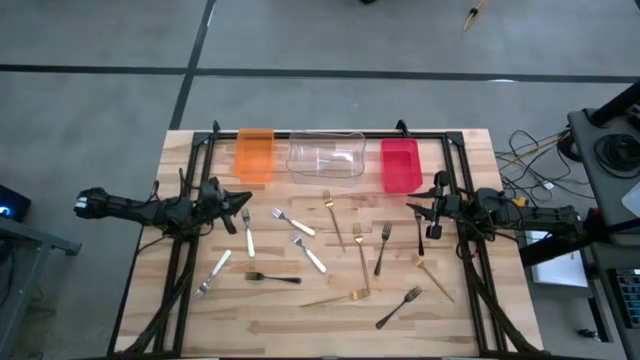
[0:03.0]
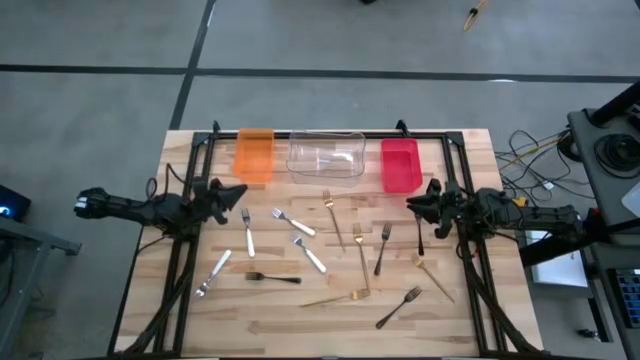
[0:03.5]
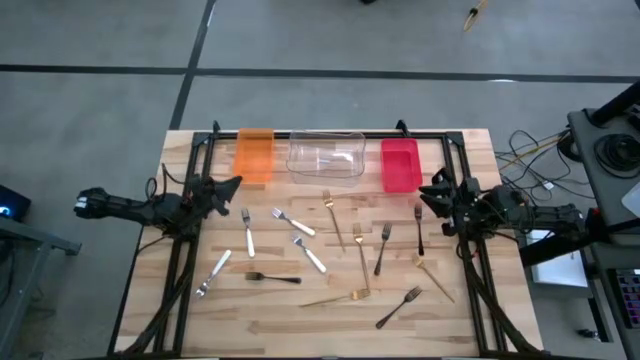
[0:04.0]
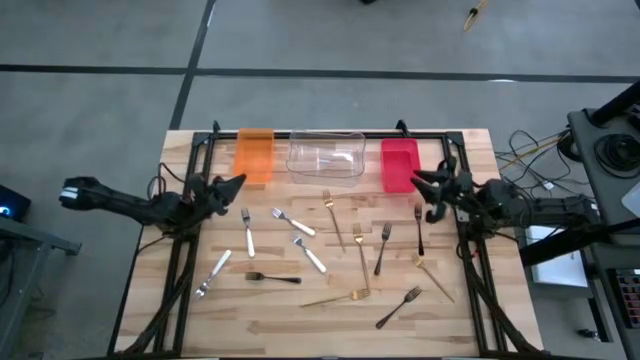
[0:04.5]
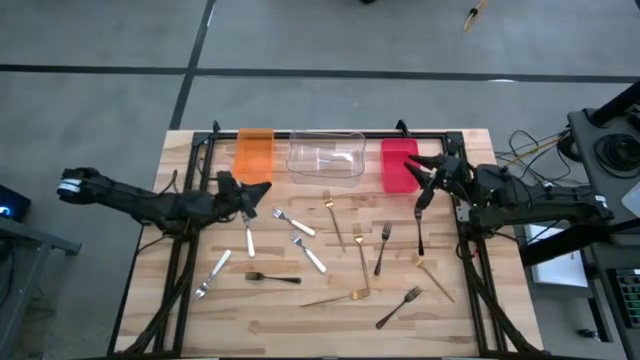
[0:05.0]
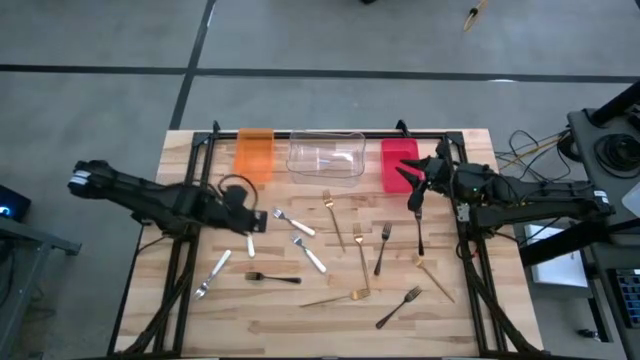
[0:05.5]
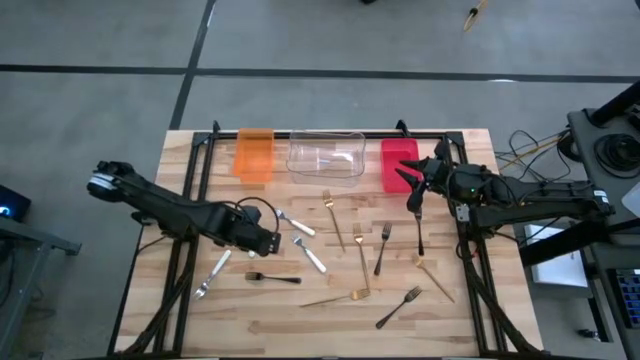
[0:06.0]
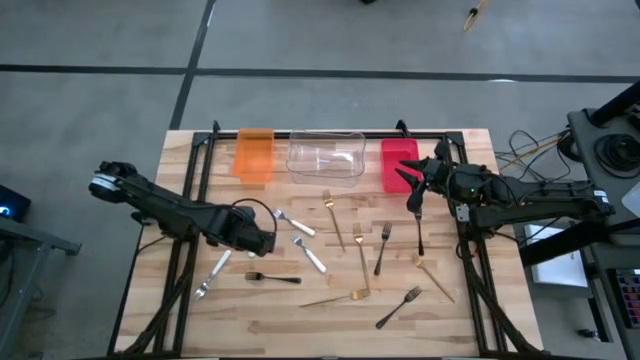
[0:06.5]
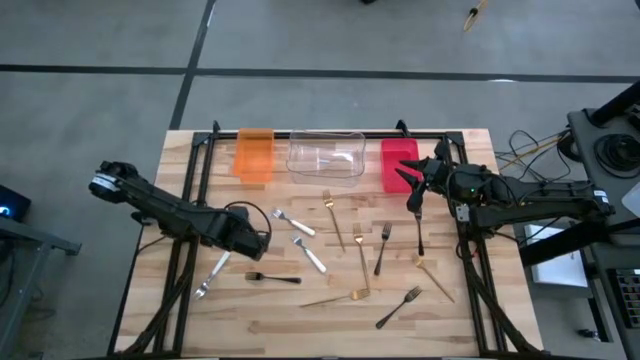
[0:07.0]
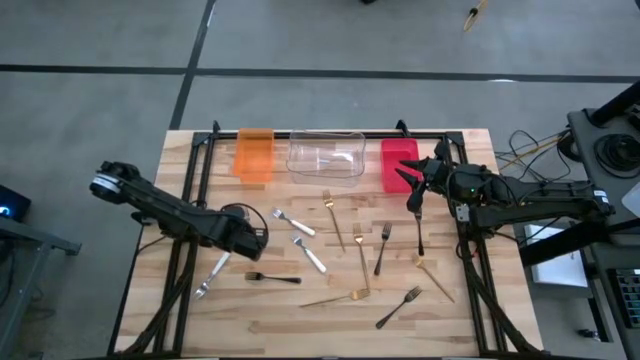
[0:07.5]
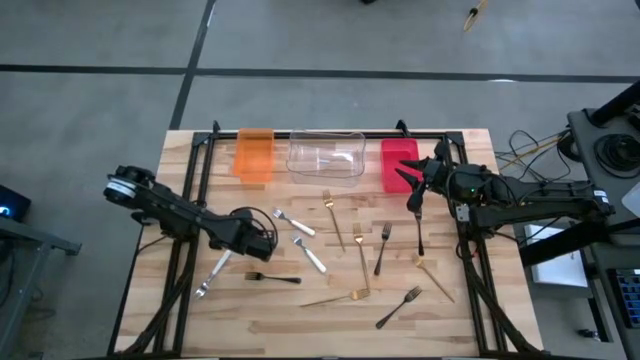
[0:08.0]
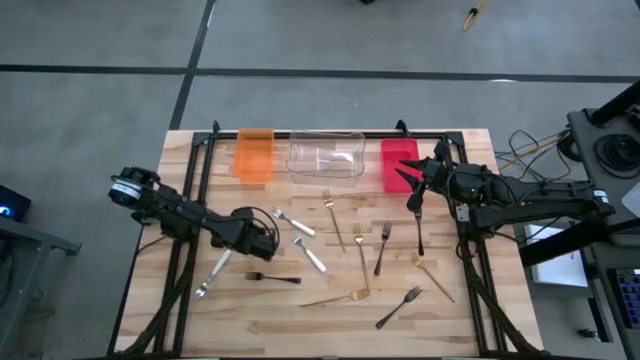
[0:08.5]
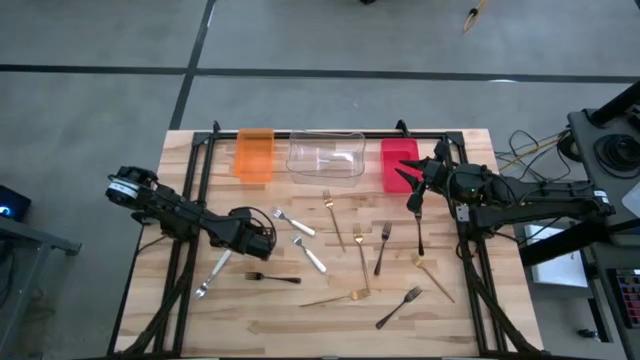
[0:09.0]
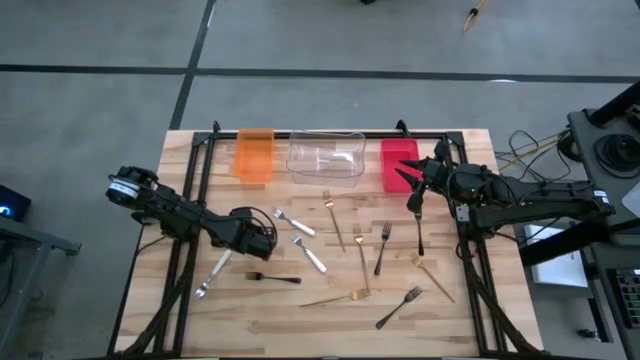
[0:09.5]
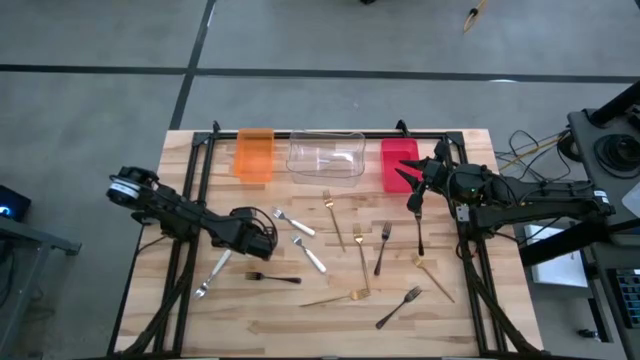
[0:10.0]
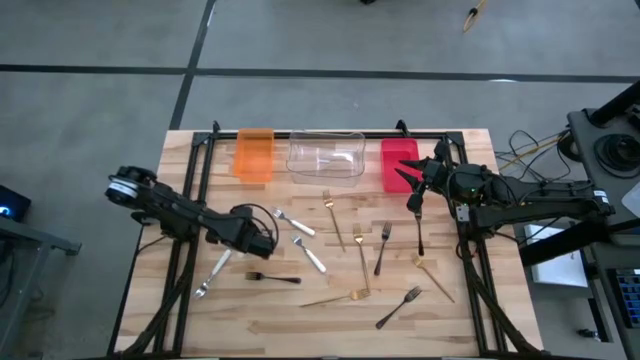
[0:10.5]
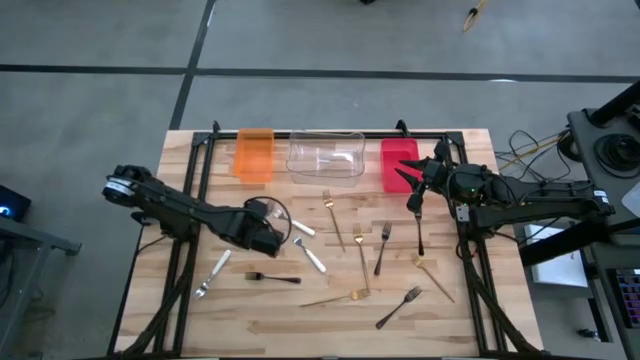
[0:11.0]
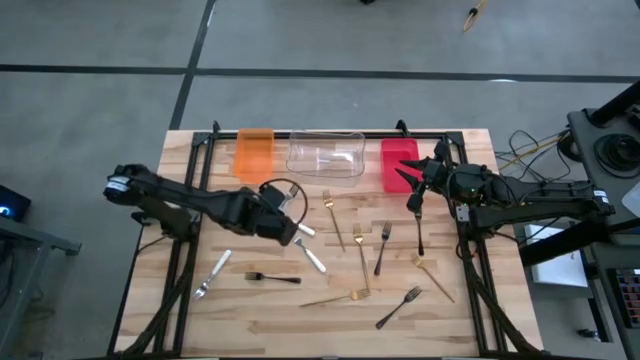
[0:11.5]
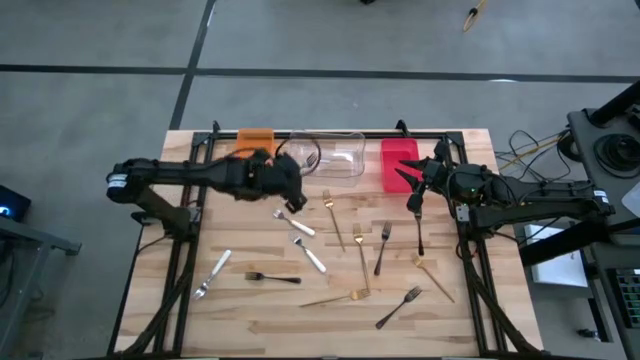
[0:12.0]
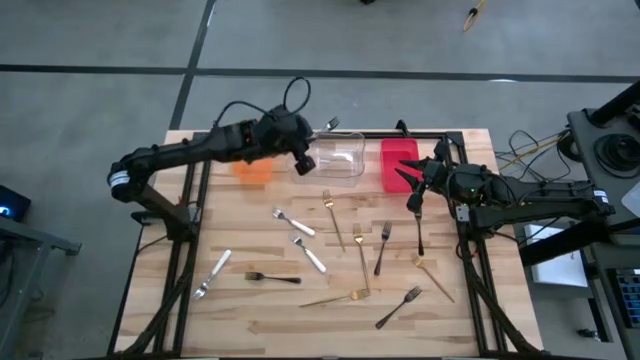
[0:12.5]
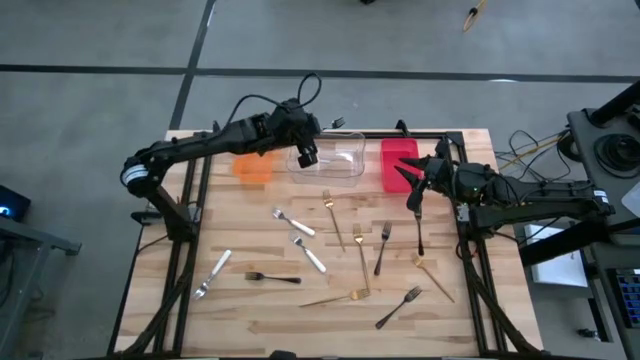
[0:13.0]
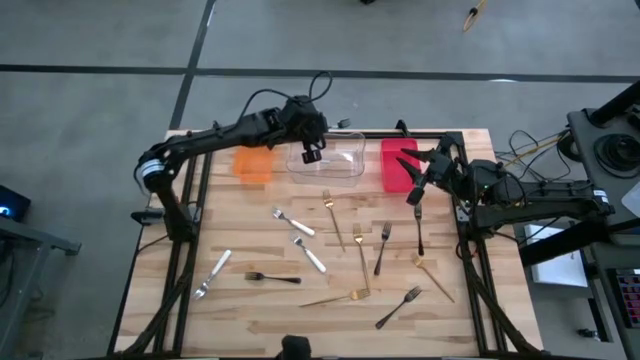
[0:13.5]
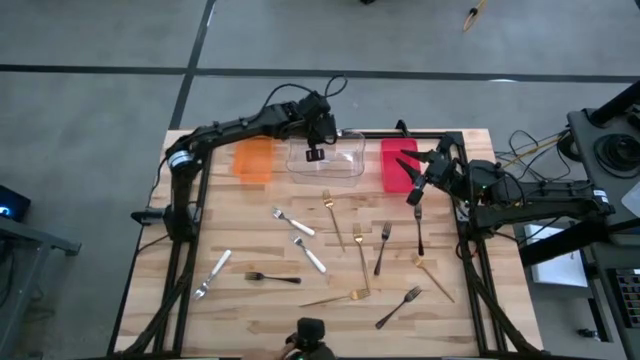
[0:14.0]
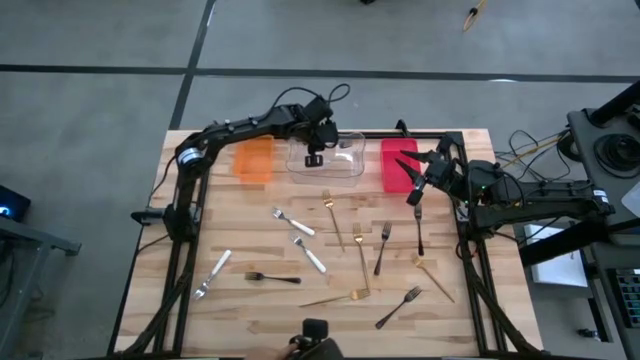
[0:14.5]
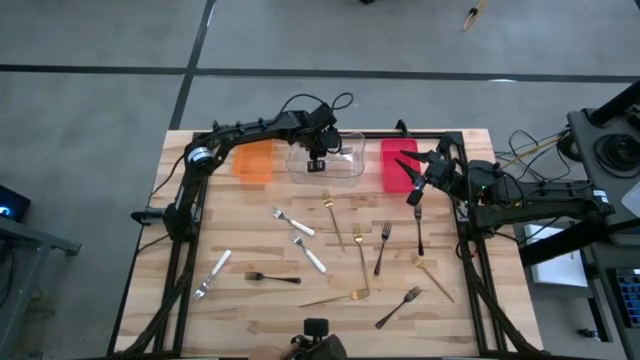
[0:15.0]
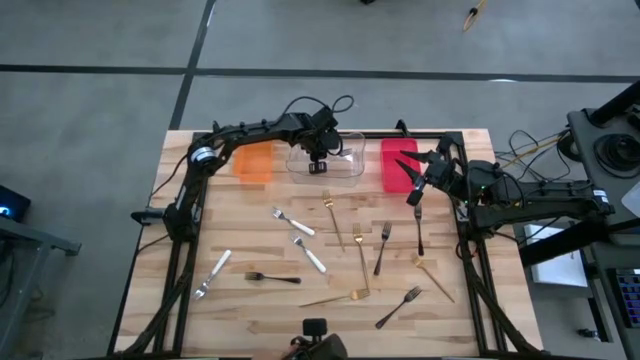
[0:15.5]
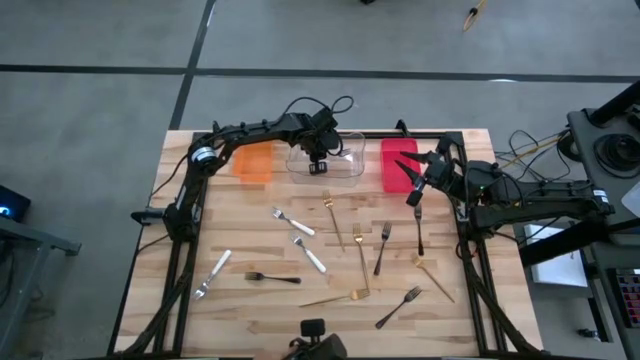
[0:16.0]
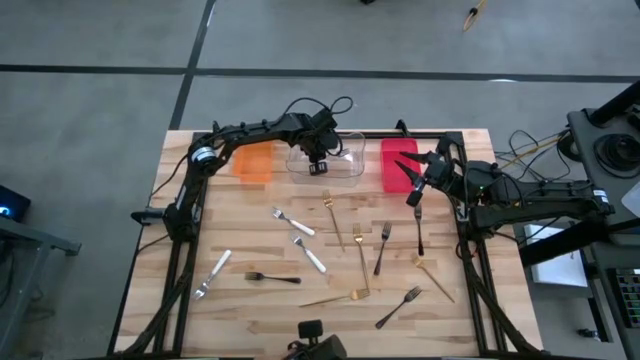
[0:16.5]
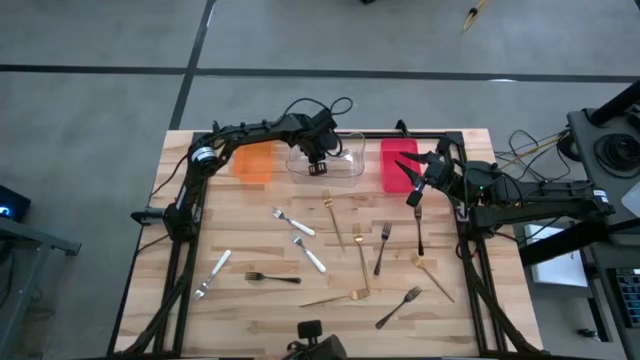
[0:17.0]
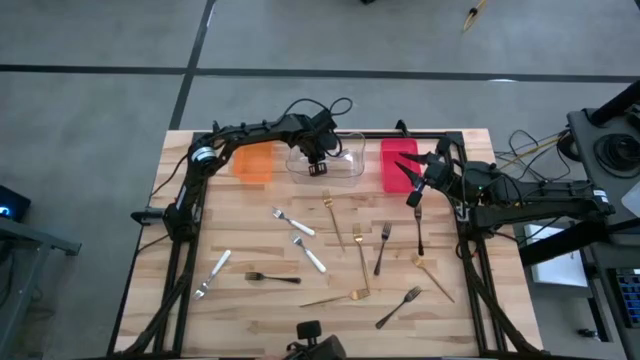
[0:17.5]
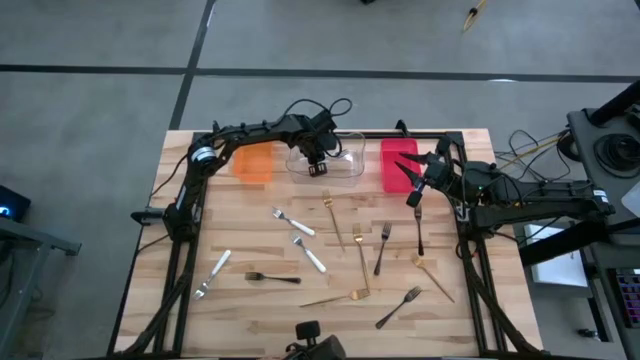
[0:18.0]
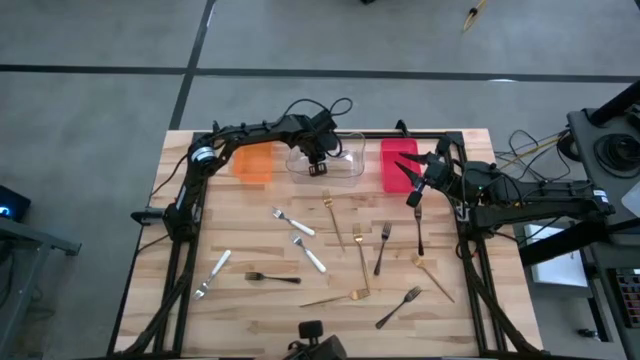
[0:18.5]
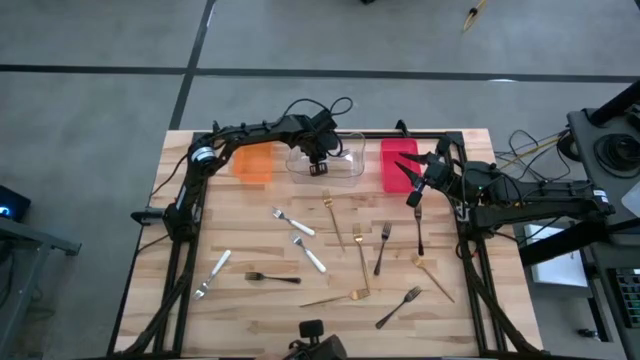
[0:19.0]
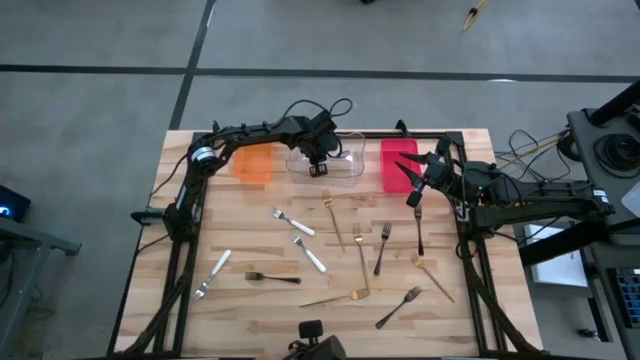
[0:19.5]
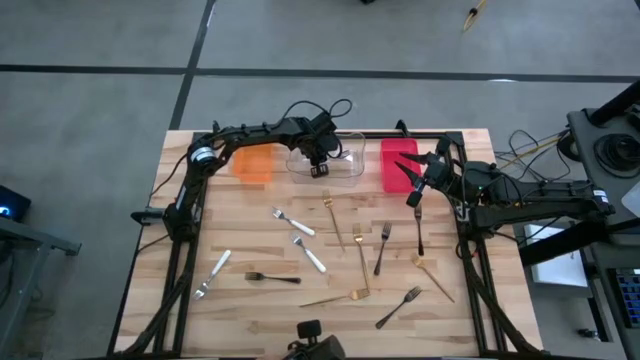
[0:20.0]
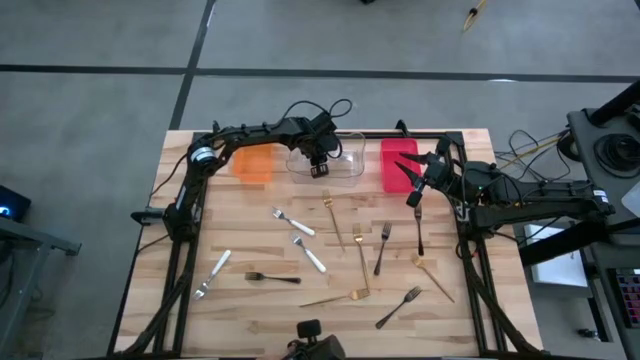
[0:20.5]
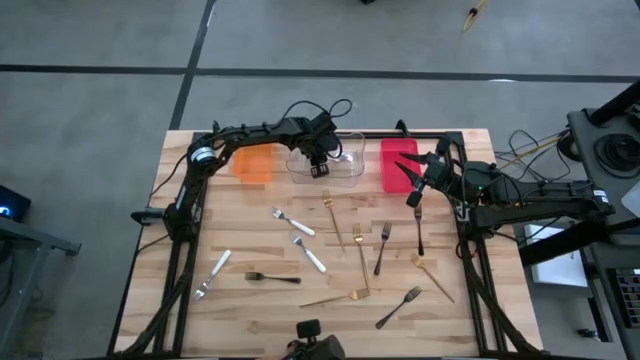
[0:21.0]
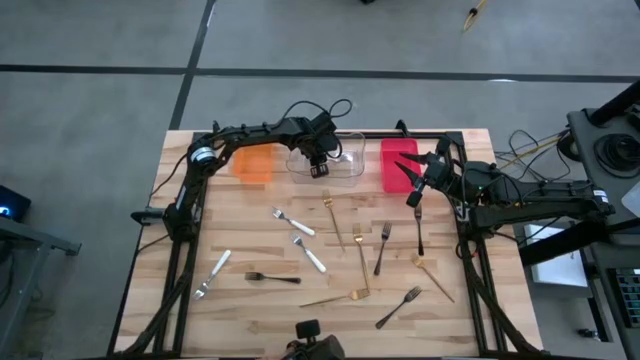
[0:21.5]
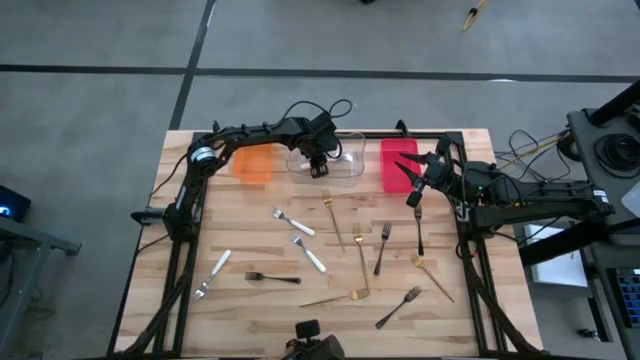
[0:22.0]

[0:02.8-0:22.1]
Task: Sort silverware by color (type)
Put the white fork into the transparent bin
